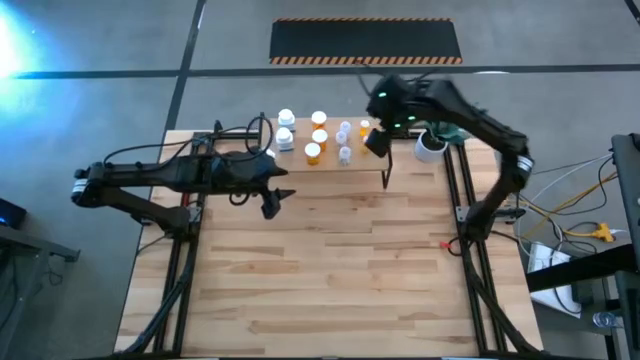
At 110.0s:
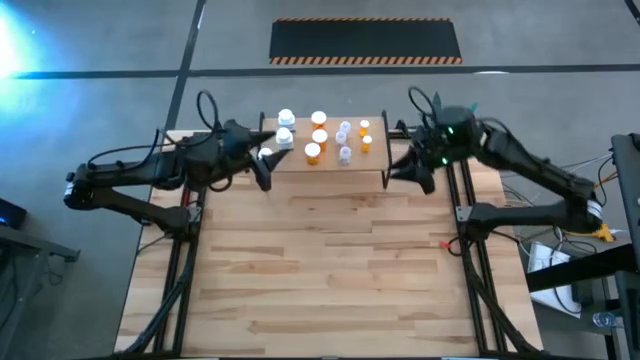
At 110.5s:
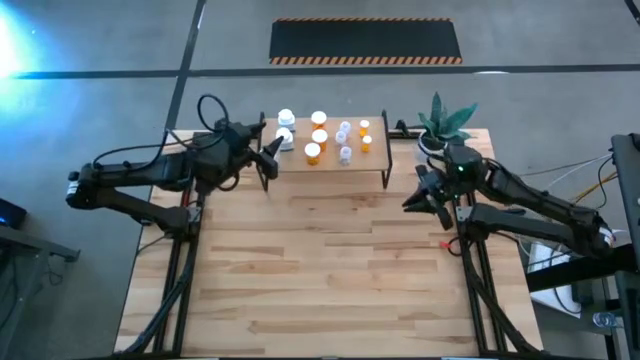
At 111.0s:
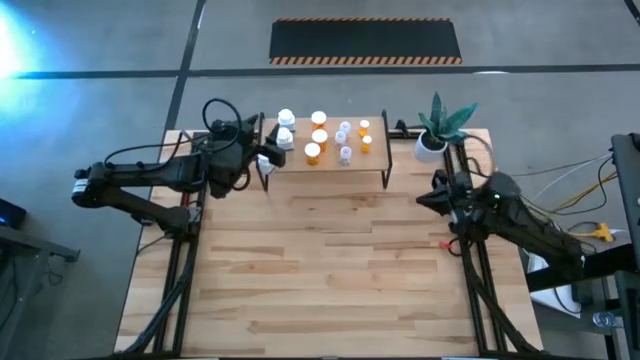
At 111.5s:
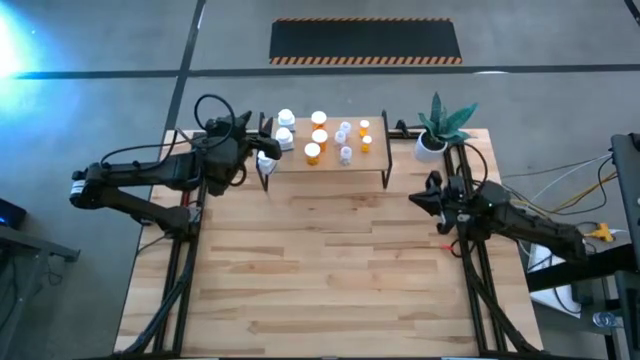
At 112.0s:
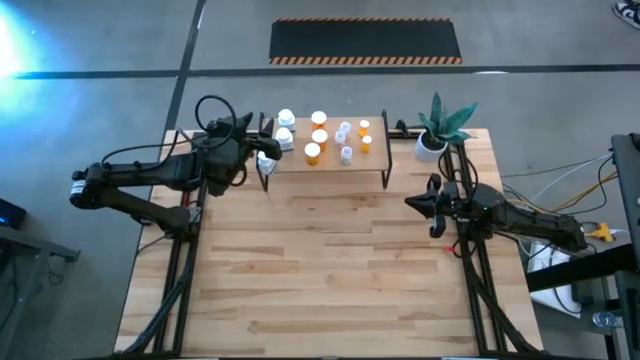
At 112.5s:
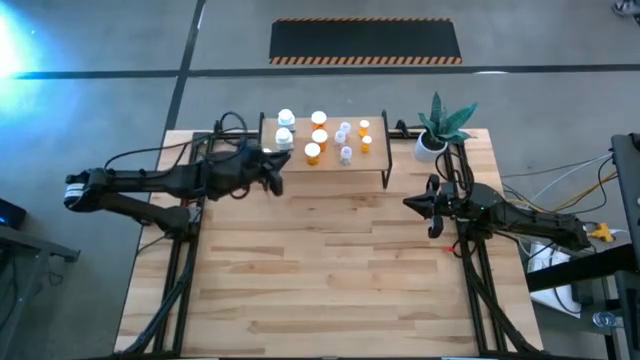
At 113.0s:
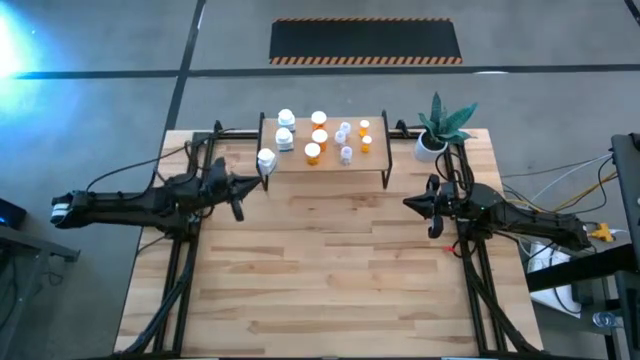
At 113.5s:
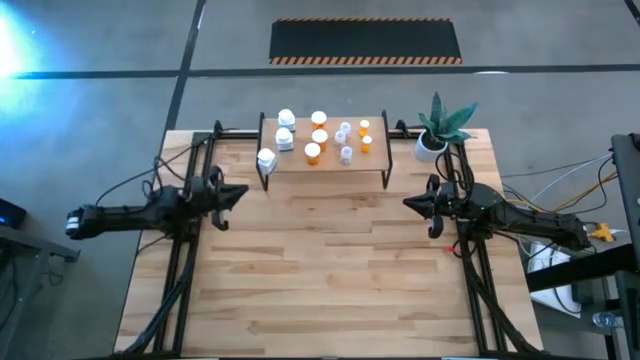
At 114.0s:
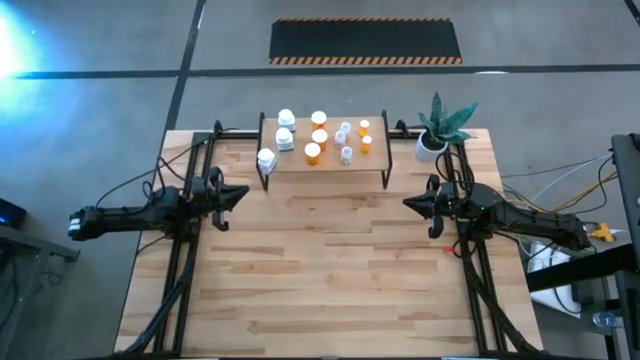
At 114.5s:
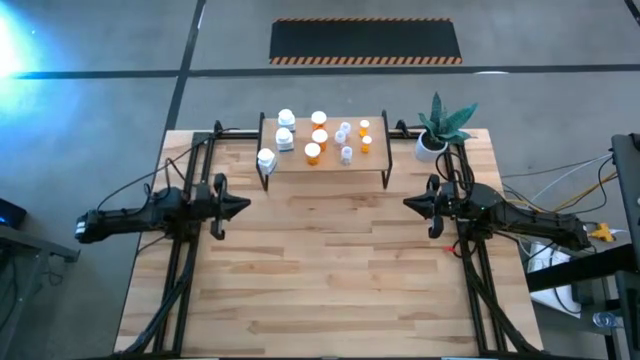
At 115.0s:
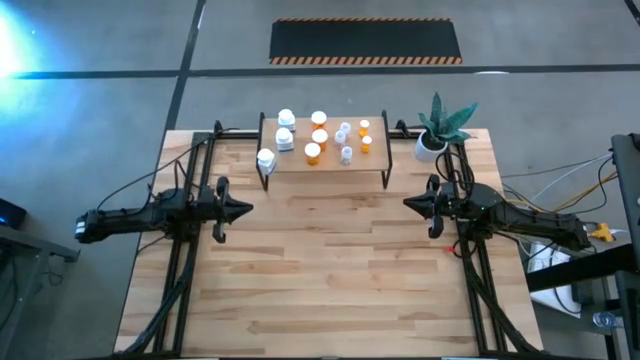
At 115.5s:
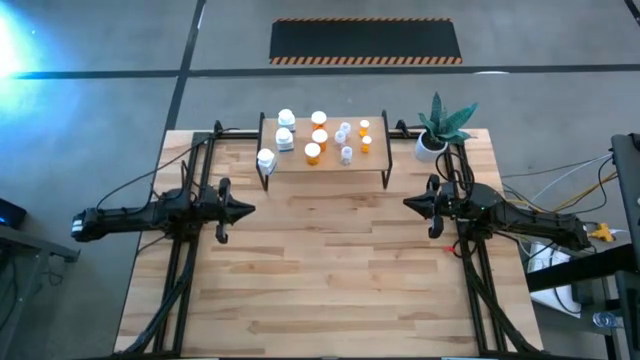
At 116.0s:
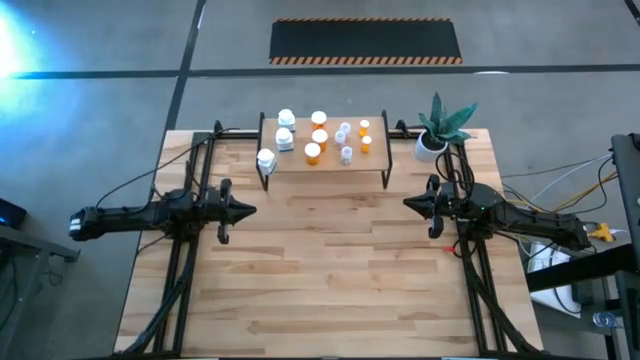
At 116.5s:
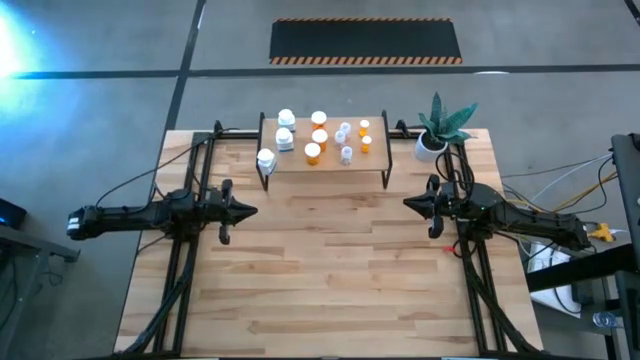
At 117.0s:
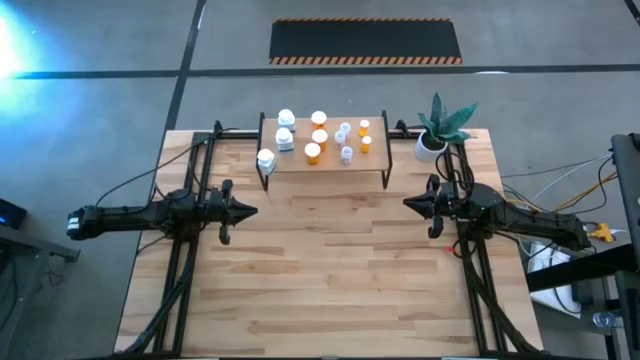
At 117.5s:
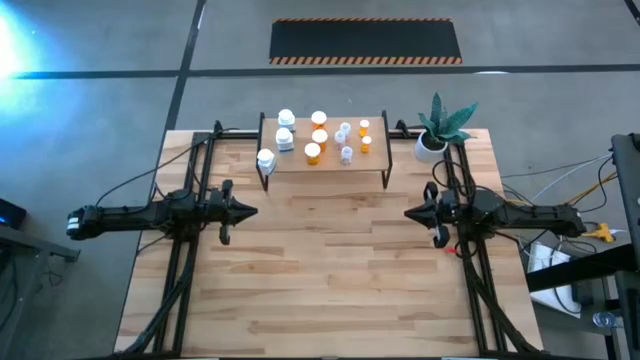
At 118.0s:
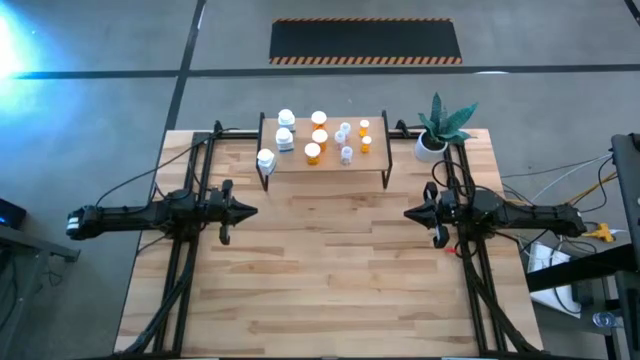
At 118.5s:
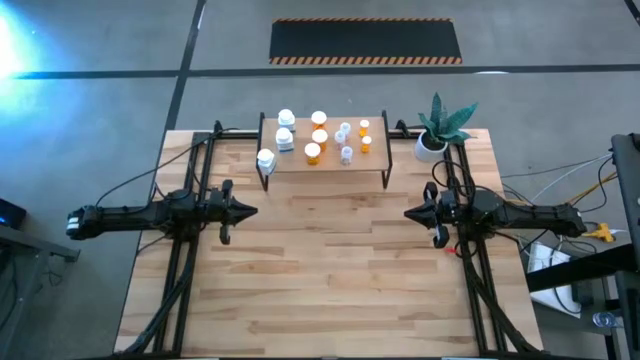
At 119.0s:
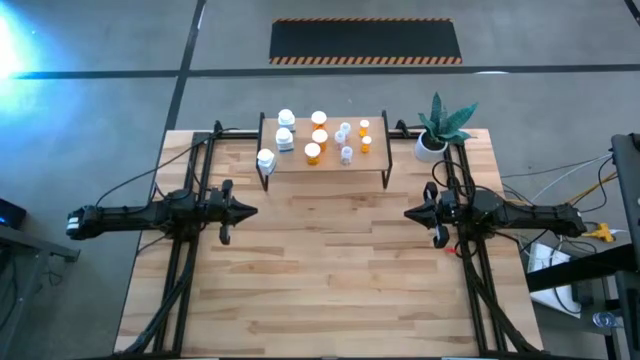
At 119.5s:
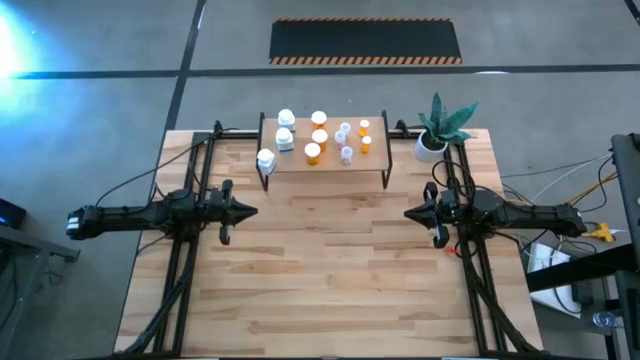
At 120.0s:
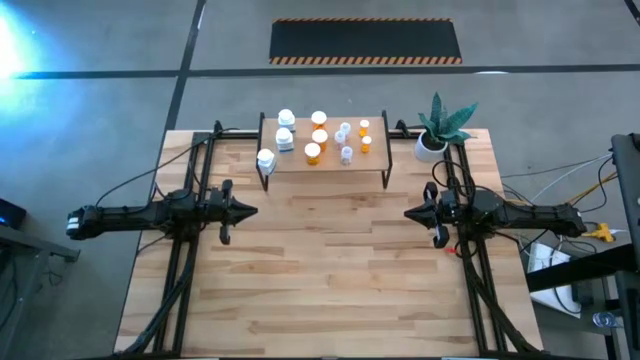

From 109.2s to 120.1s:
Task: Pick and place medicine bottles onto shelf by color
Return to Home position

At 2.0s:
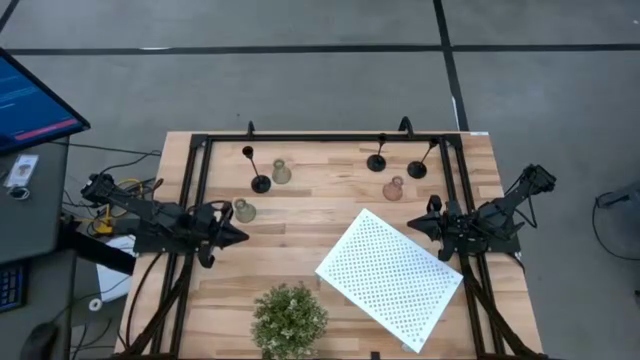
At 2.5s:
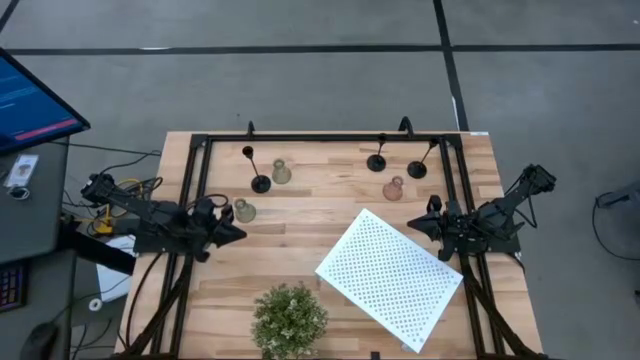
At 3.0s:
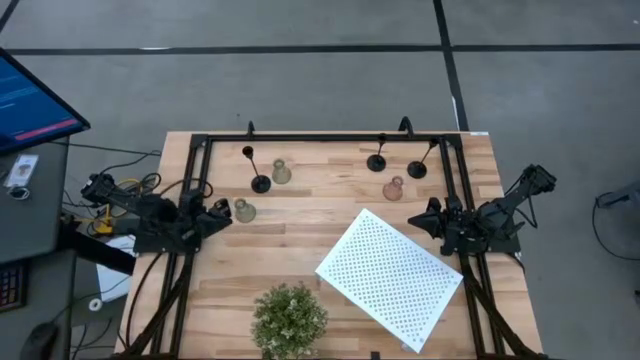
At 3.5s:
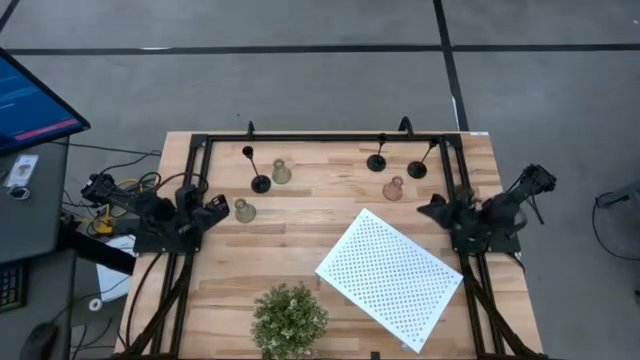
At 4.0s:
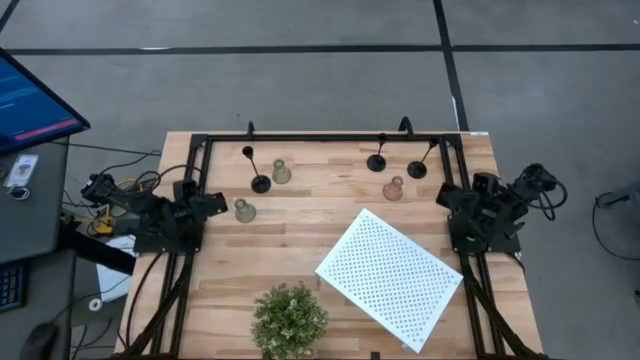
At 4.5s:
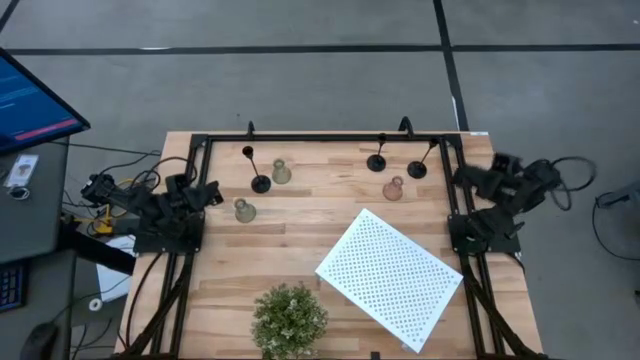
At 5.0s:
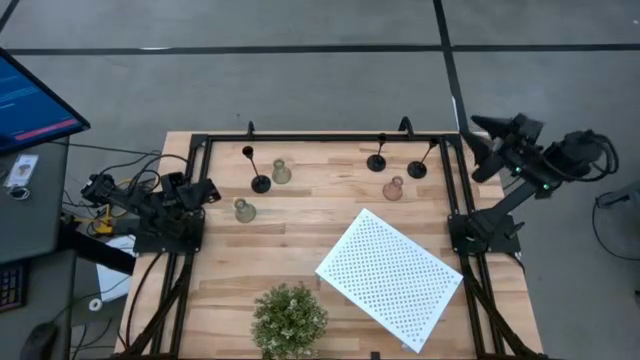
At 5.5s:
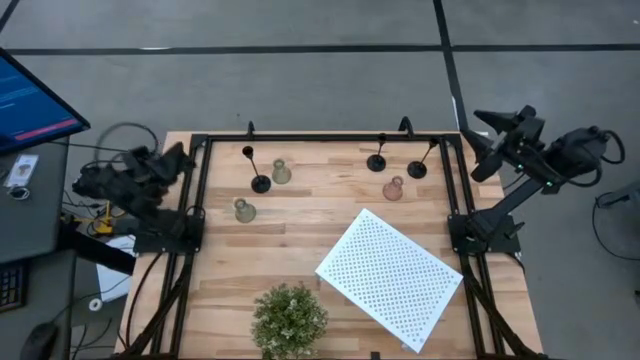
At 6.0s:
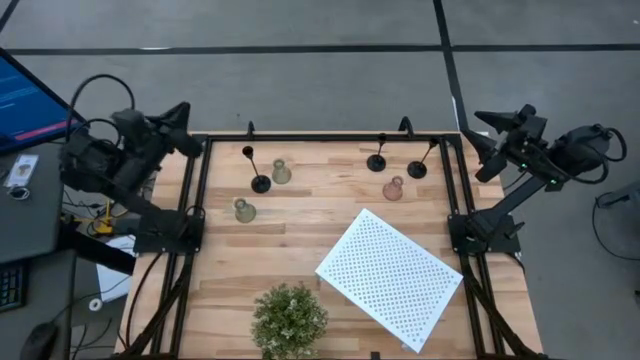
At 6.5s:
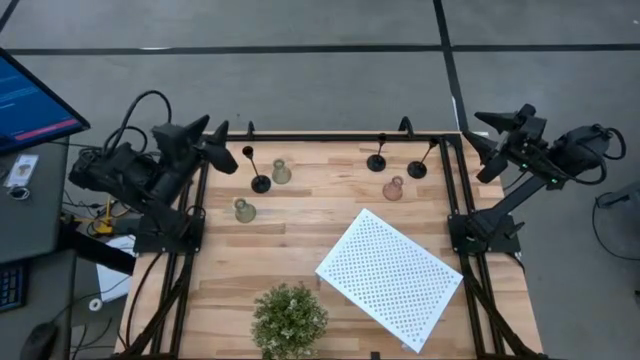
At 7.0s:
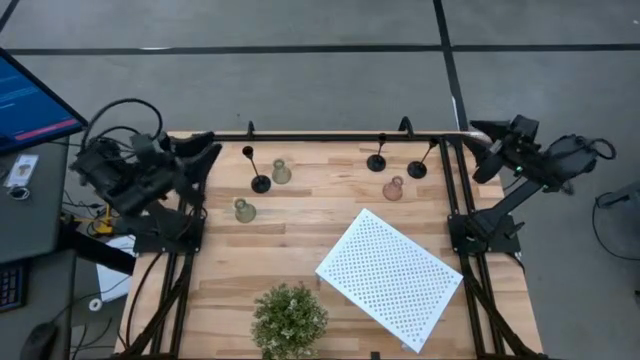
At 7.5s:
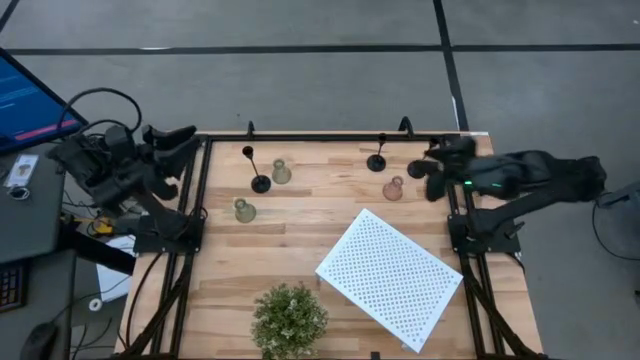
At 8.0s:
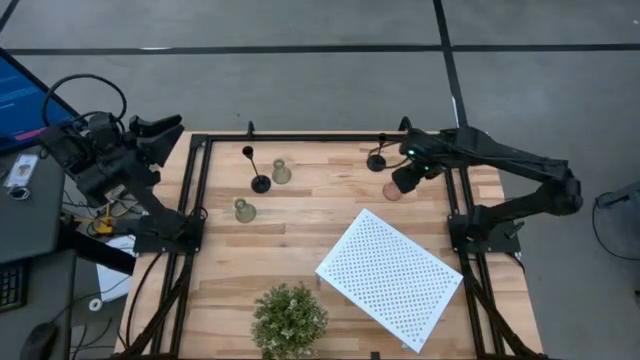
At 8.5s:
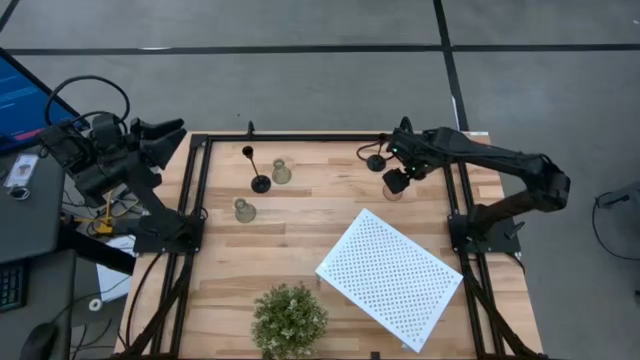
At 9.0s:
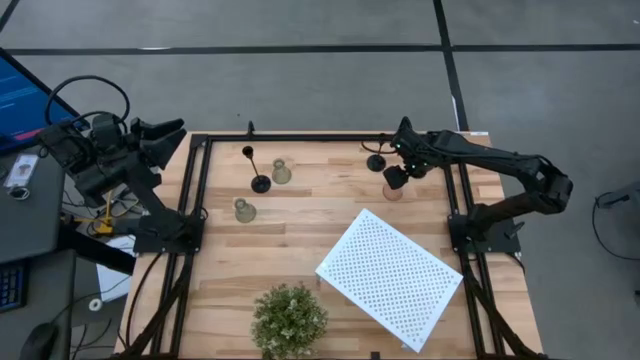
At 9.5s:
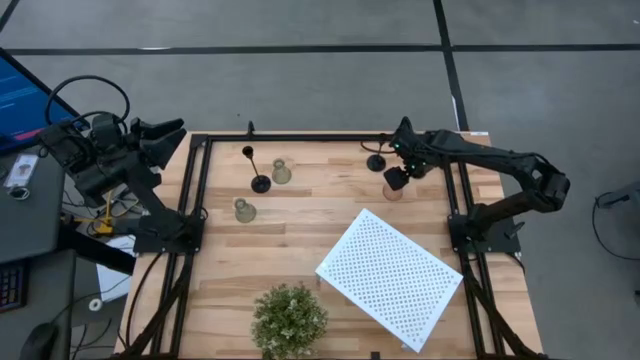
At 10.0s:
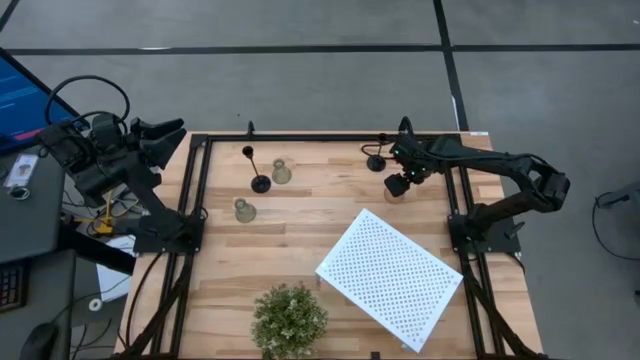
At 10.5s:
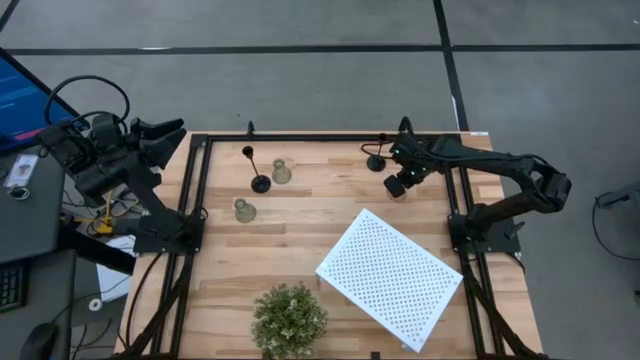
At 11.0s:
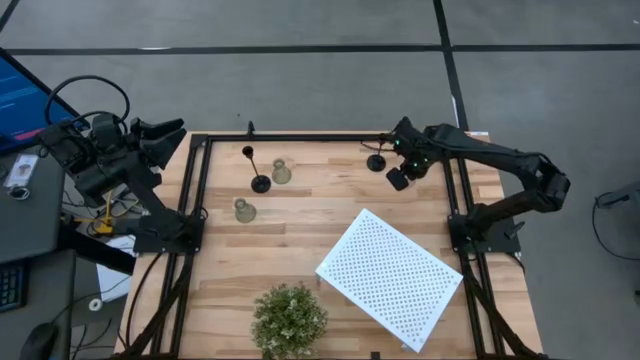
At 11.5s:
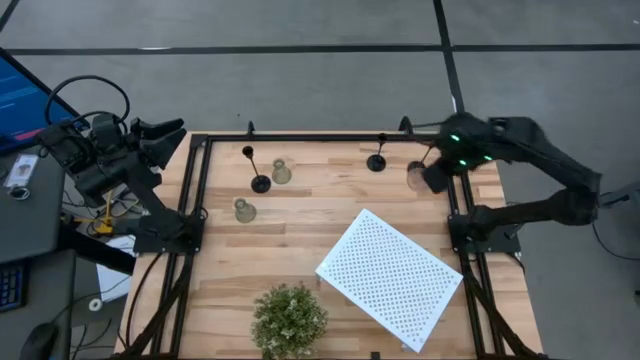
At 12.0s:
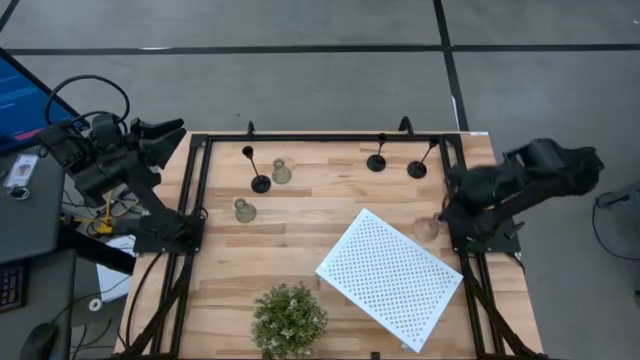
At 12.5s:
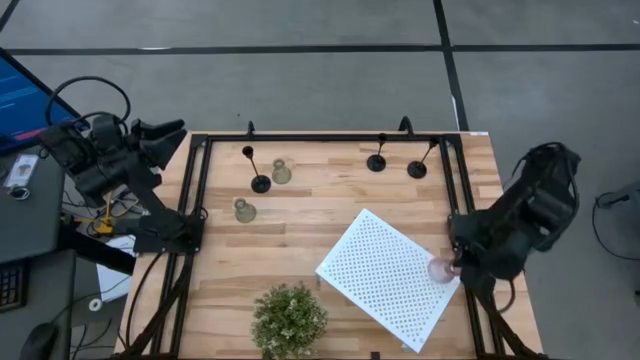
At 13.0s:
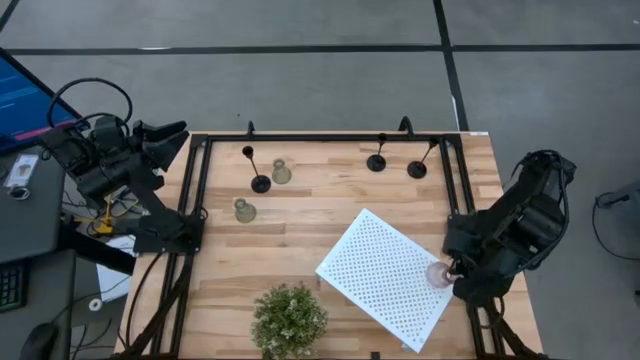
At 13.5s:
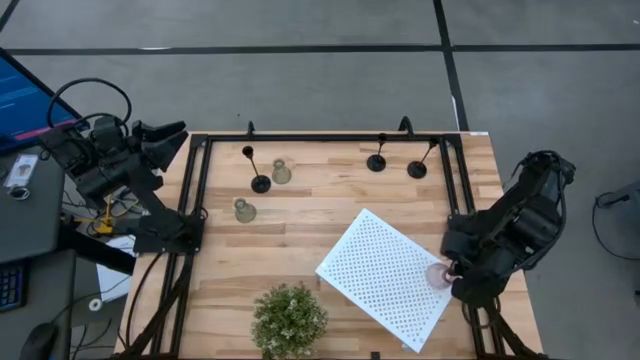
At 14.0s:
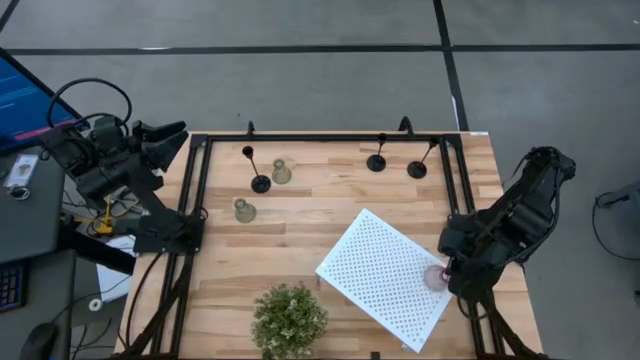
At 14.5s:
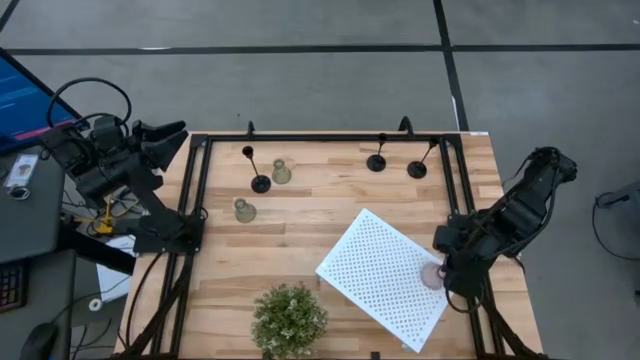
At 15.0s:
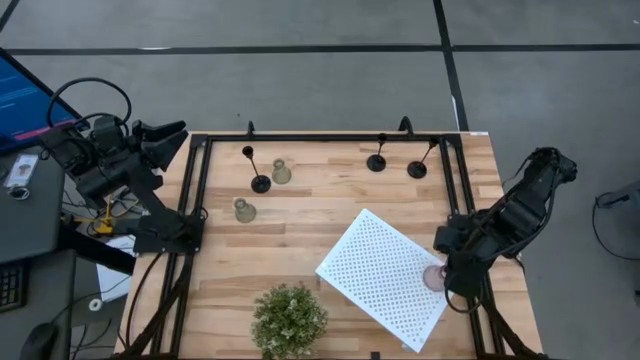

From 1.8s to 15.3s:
Task: Pick & Place candle stick holders
Put the pink glass candle holder on the shelf
